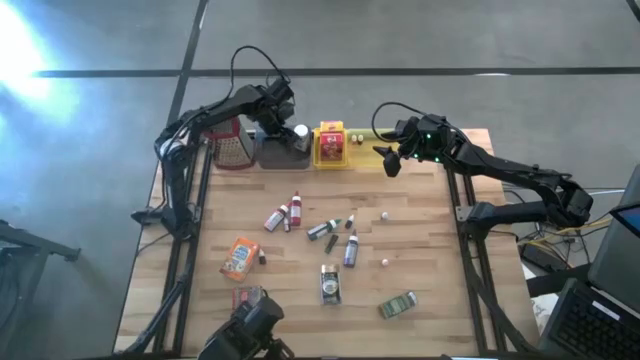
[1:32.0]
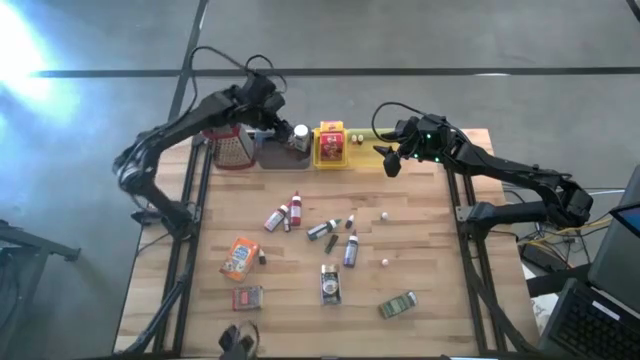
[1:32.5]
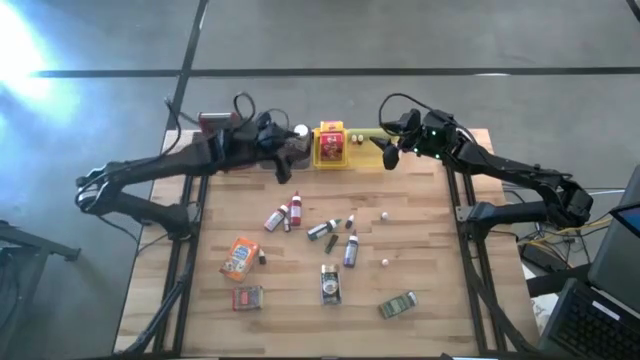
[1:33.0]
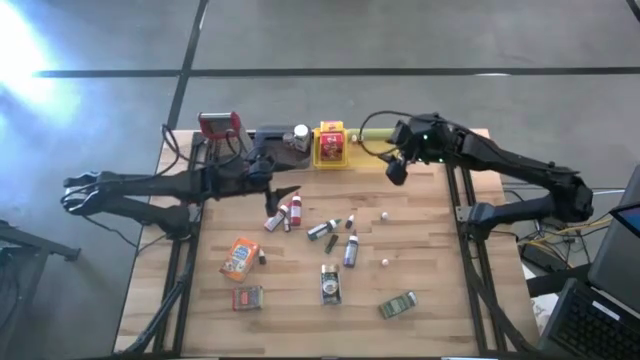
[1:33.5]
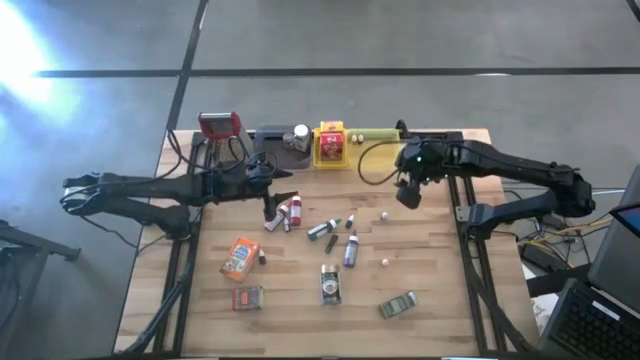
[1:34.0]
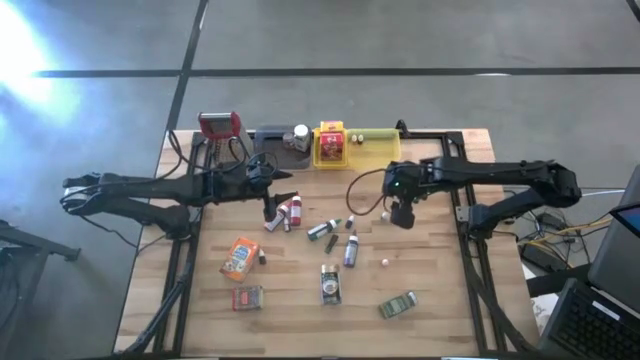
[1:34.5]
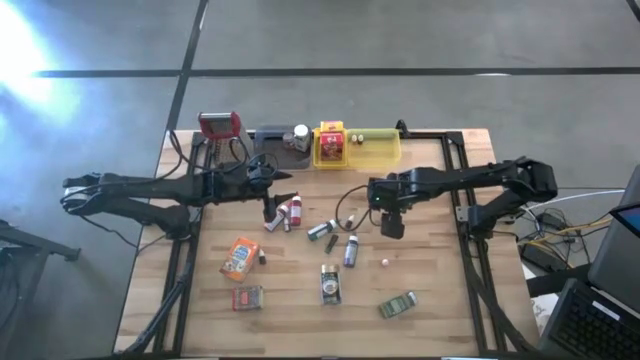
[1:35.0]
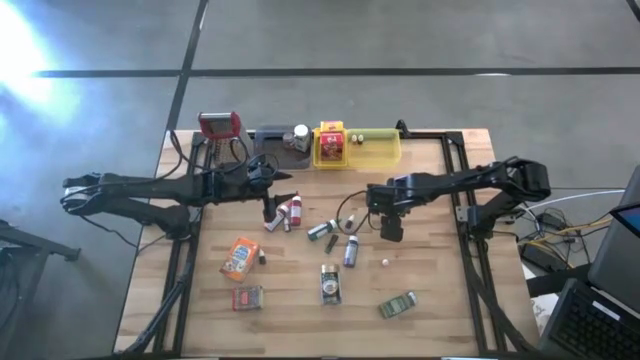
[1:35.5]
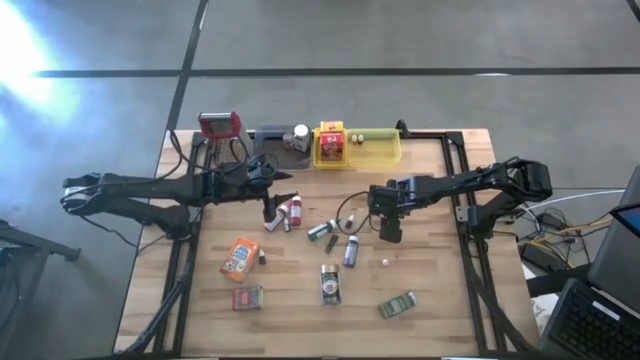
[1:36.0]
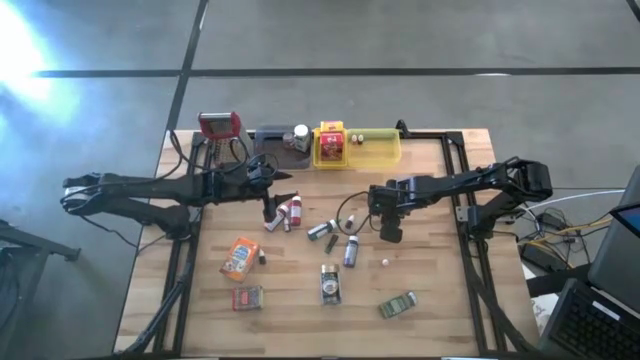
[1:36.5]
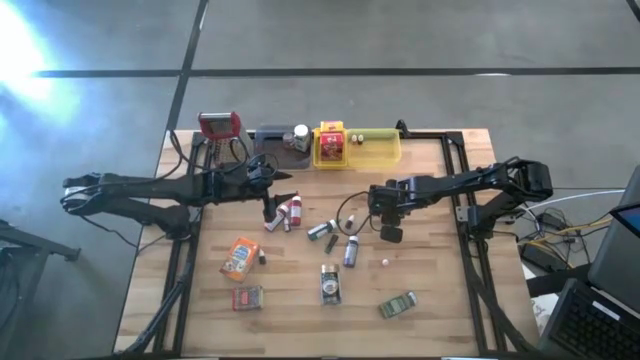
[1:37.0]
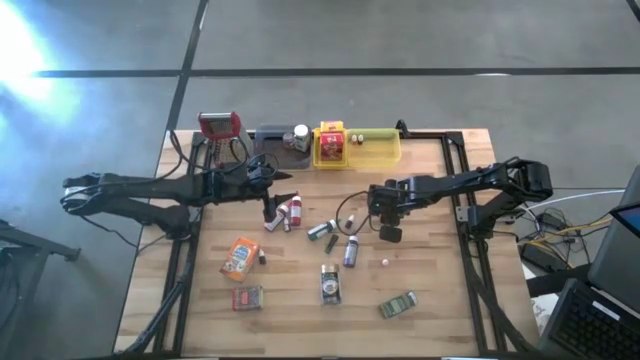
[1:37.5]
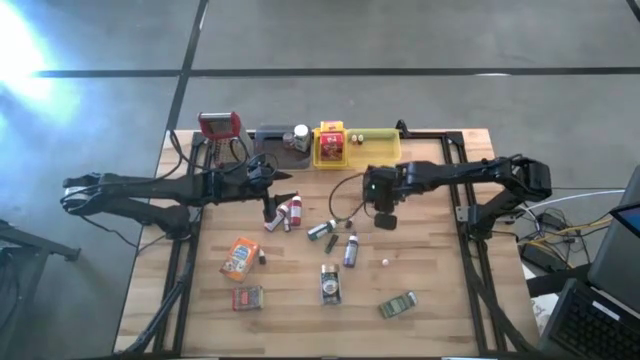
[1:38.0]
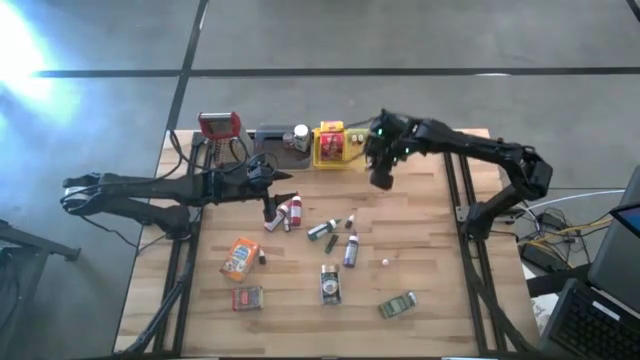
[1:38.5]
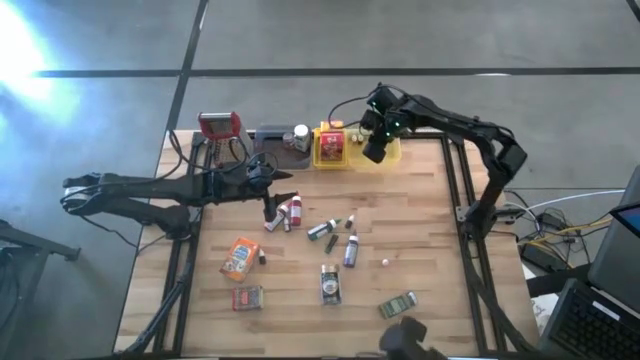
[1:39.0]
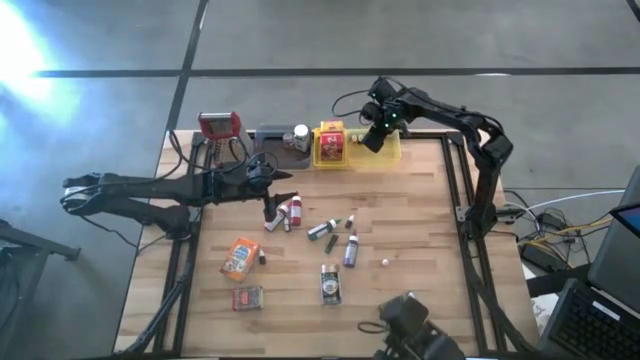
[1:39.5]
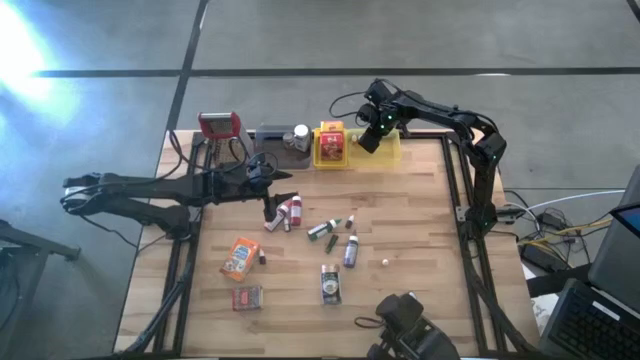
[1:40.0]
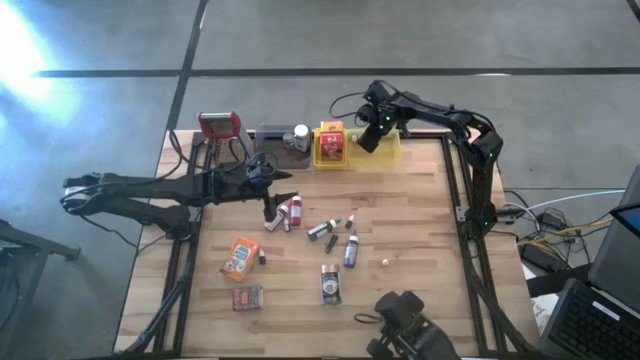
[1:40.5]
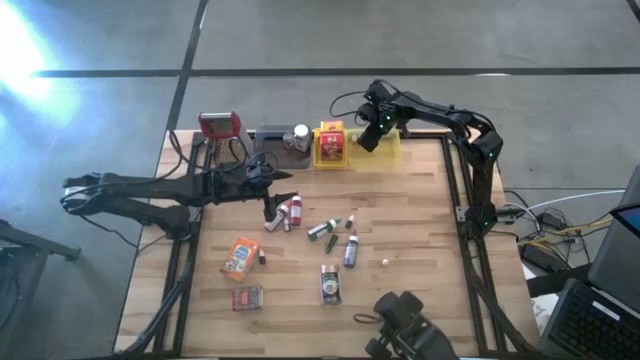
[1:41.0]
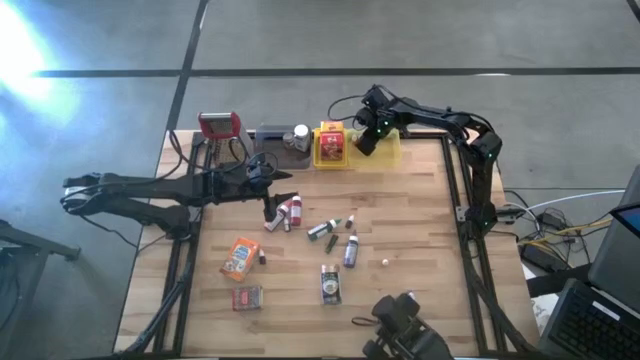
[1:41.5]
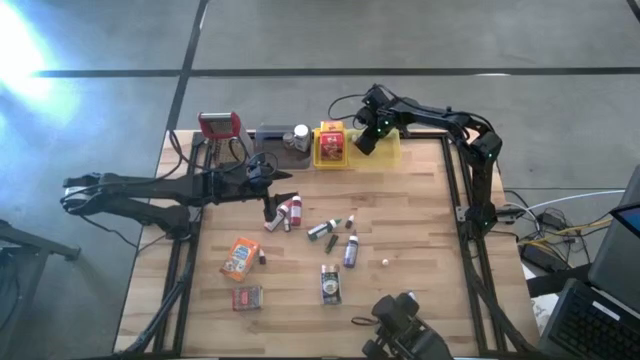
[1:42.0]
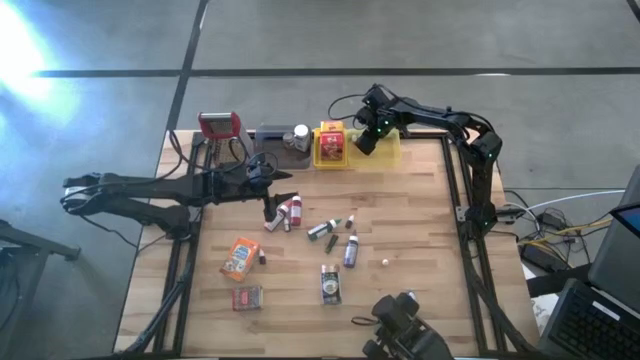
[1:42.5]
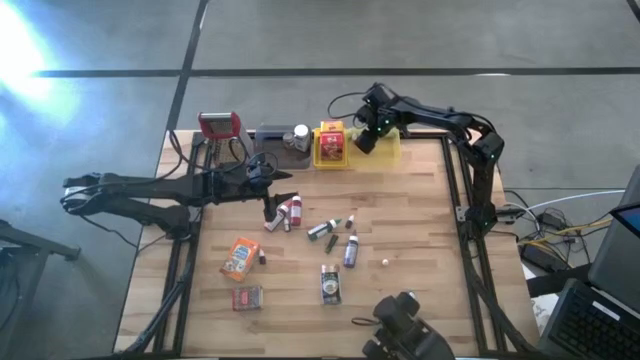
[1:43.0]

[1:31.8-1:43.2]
Task: Pick & Place Kitchen Items
Put the black food coloring bottle into the light yellow bin
